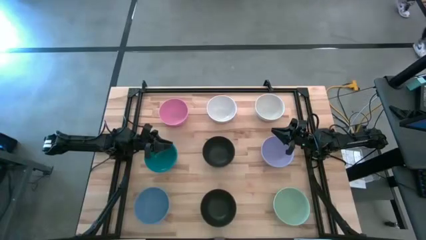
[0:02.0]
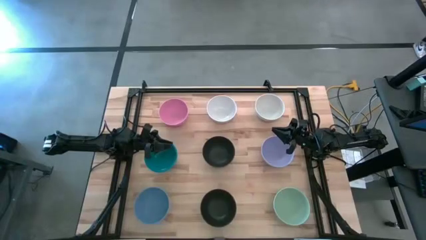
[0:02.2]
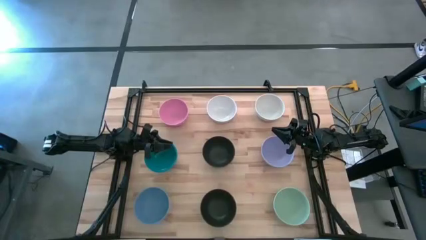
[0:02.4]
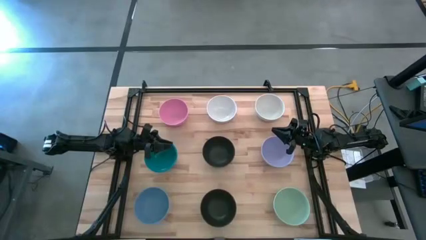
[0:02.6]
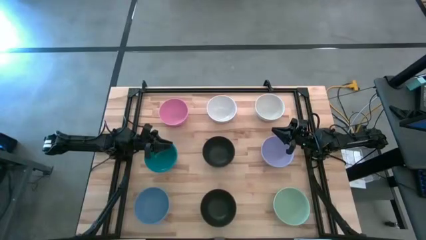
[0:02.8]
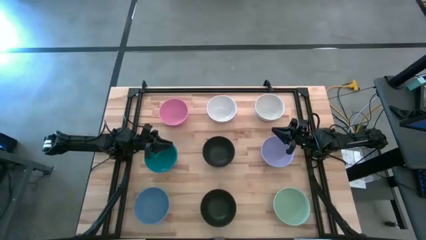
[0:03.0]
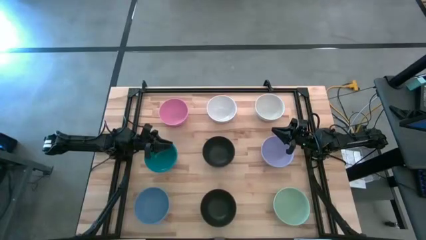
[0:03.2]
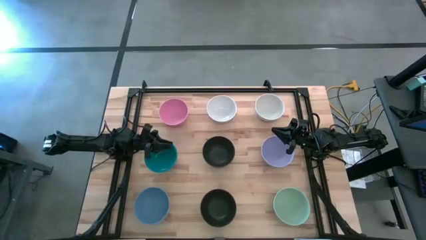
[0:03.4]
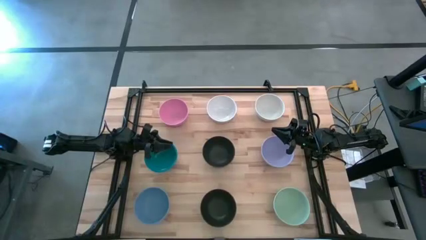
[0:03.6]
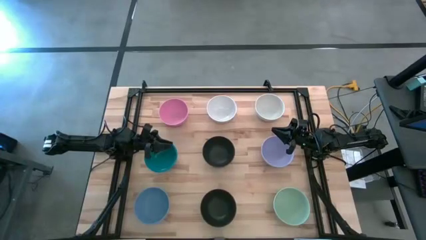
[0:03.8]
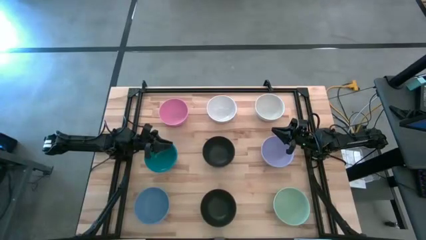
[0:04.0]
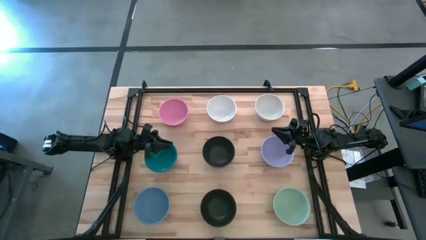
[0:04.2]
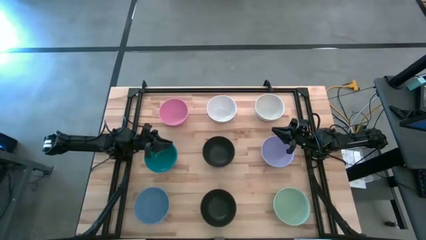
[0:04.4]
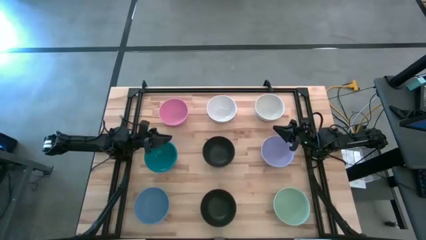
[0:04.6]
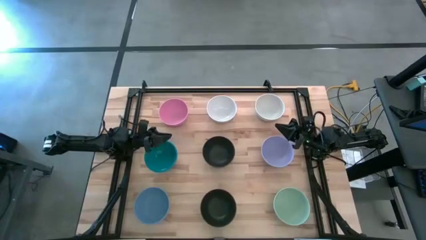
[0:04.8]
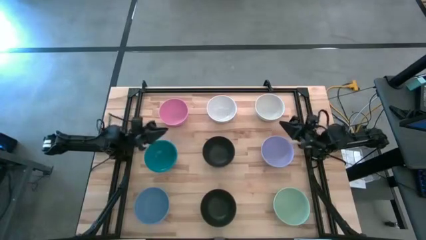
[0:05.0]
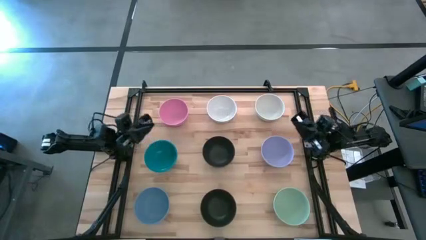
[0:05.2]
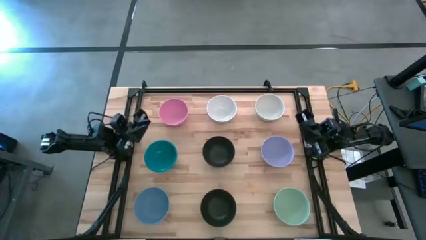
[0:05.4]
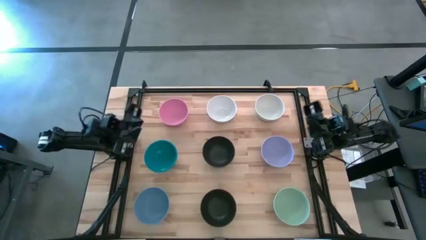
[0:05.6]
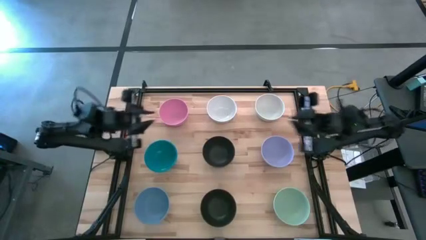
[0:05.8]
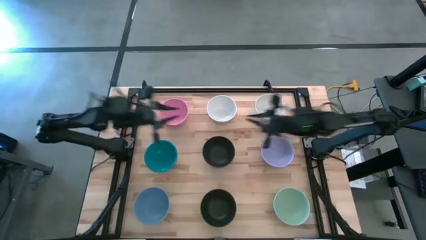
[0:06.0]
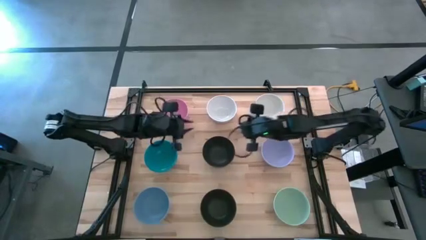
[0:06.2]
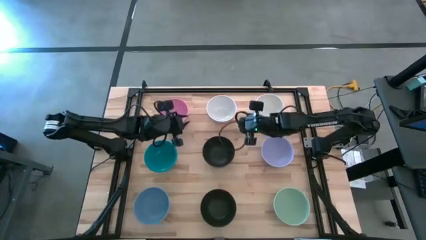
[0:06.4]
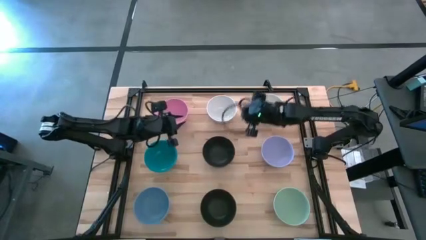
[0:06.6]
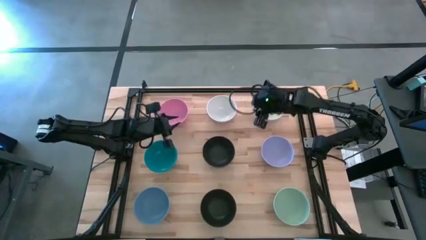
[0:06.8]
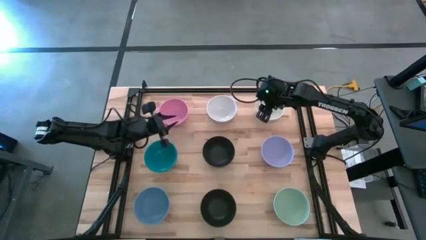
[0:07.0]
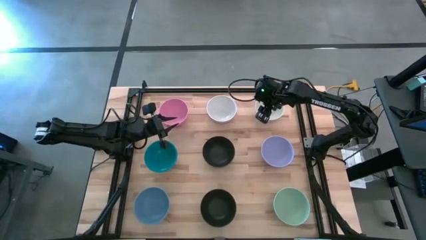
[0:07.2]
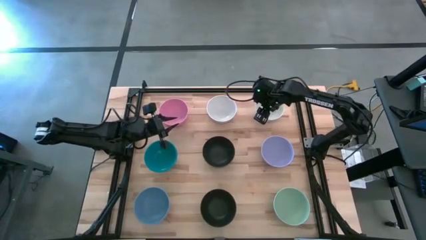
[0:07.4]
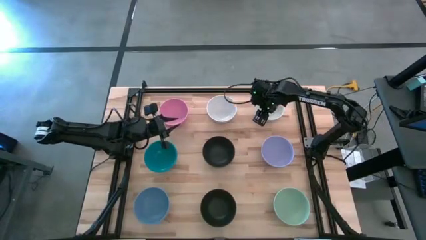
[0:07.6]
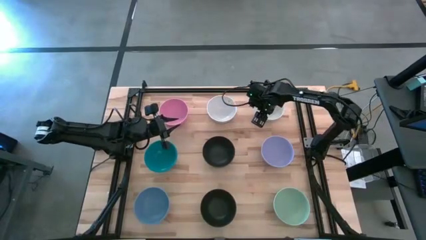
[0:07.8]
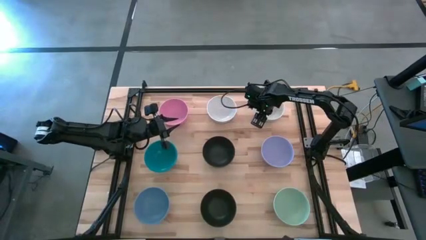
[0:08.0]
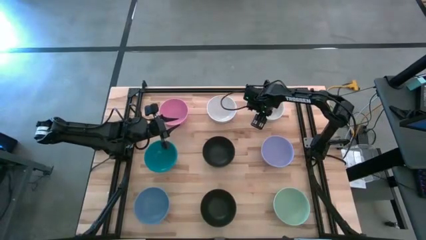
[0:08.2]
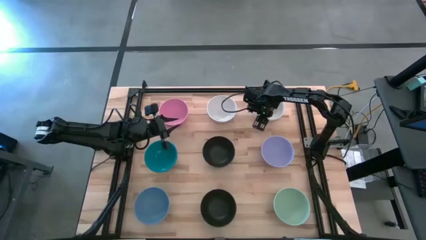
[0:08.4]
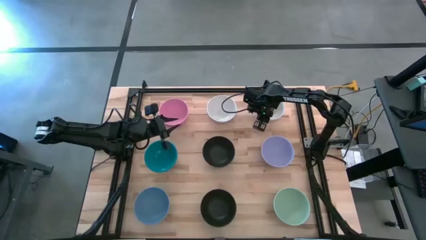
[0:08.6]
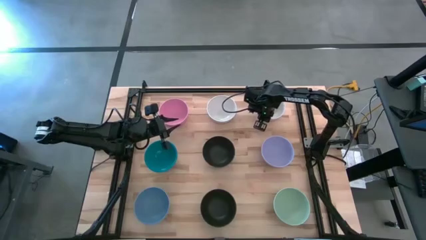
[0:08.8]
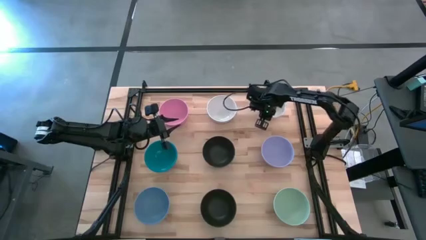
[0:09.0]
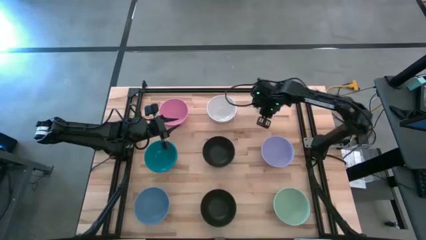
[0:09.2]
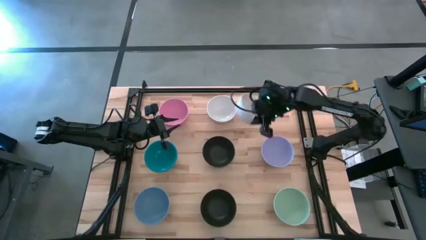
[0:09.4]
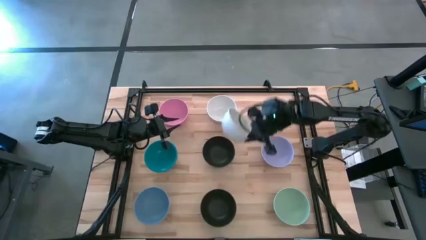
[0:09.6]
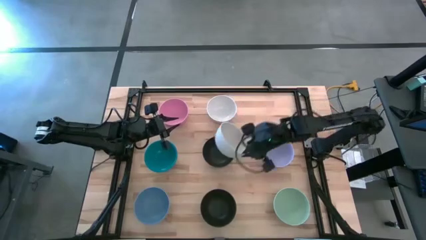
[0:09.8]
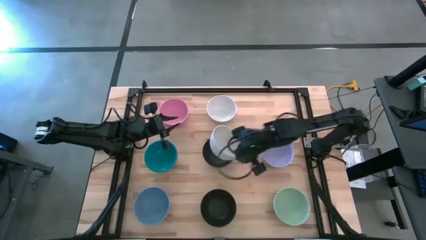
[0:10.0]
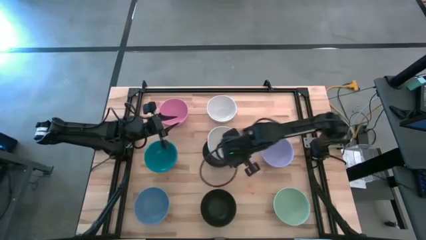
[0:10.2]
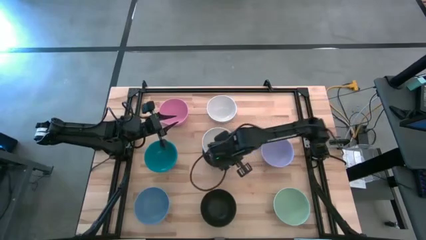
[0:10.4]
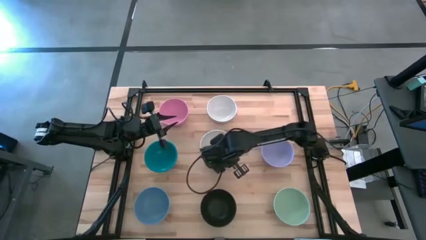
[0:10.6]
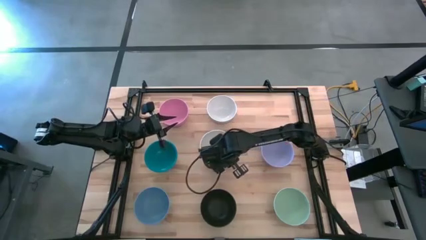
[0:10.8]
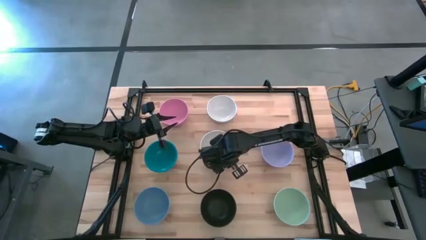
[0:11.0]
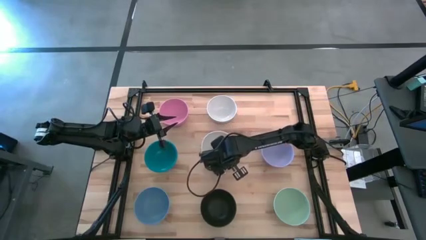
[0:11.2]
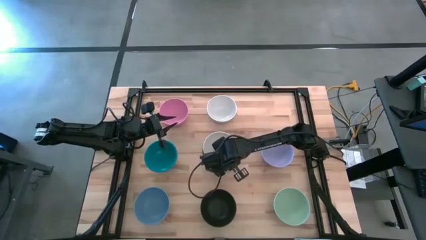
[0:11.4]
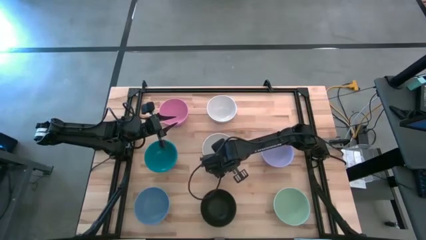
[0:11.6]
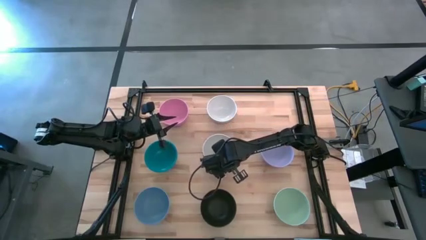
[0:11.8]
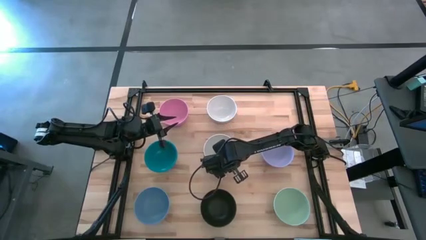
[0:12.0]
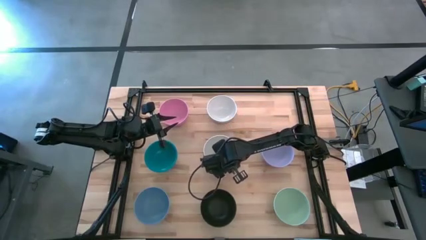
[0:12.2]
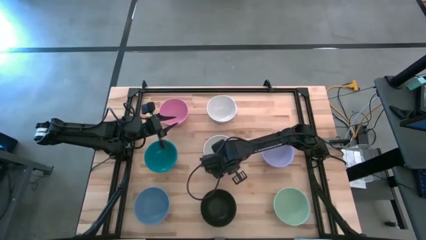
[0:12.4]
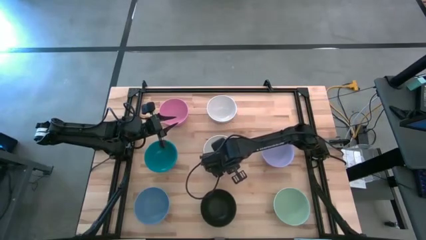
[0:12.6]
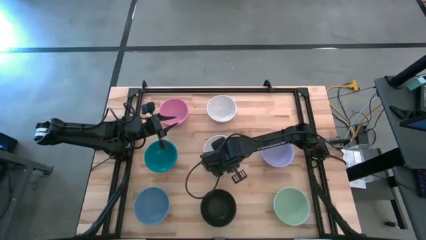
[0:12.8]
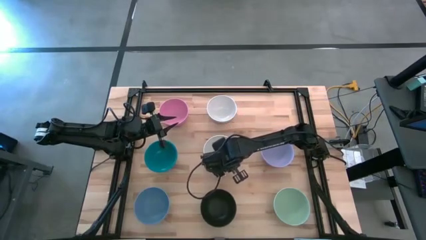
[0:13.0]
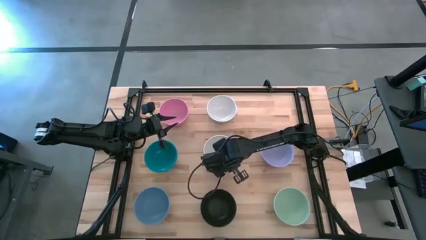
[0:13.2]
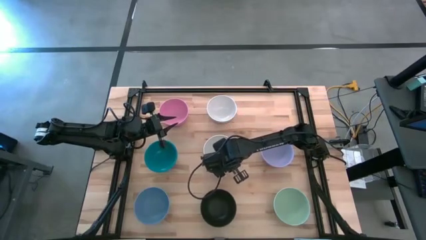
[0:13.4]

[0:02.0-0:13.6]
Task: Nest bowls inside each other
Stack the right white bowl on top of the top black bowl

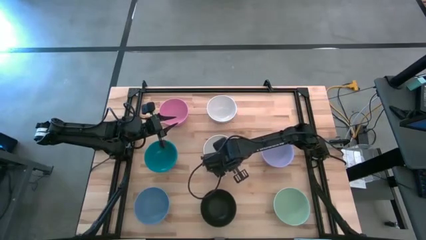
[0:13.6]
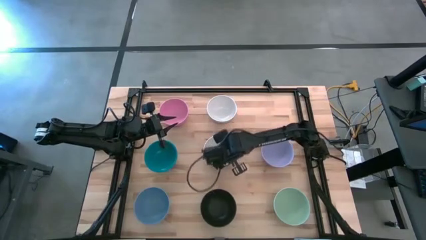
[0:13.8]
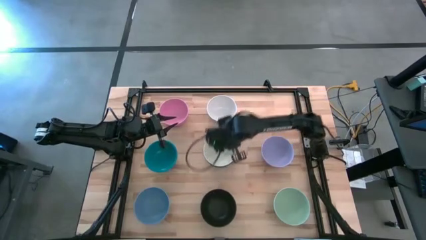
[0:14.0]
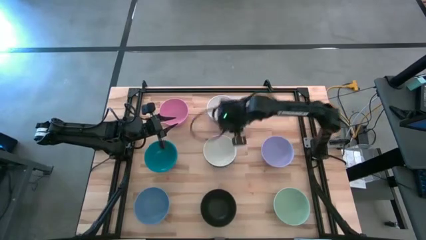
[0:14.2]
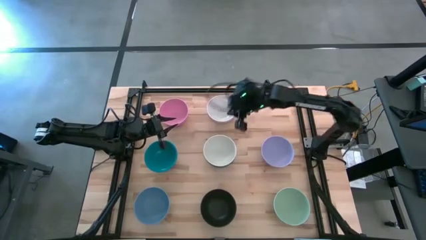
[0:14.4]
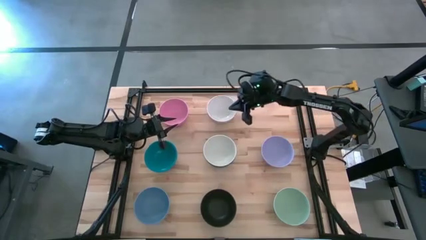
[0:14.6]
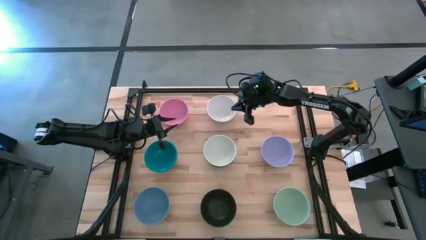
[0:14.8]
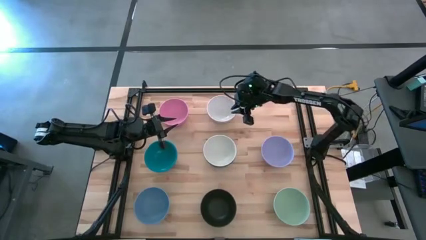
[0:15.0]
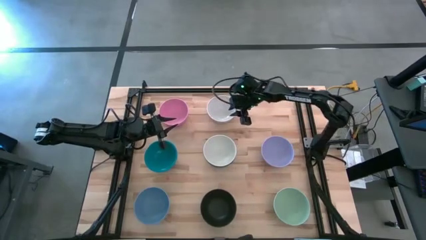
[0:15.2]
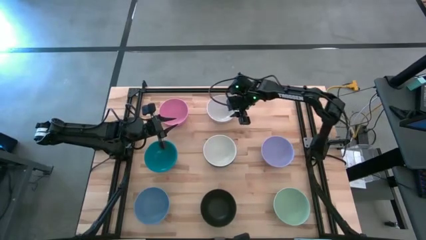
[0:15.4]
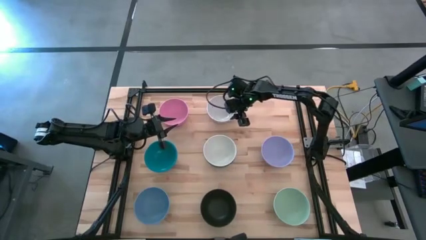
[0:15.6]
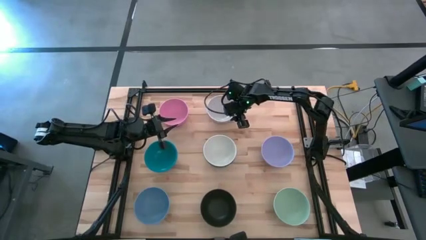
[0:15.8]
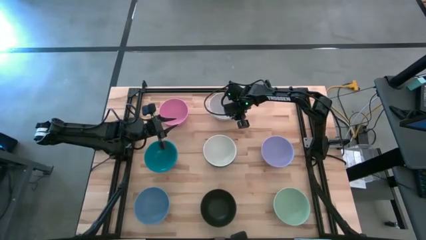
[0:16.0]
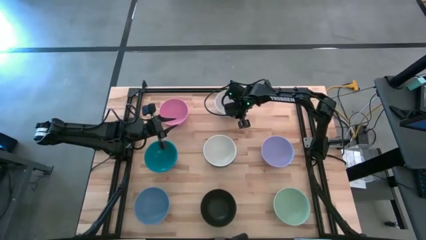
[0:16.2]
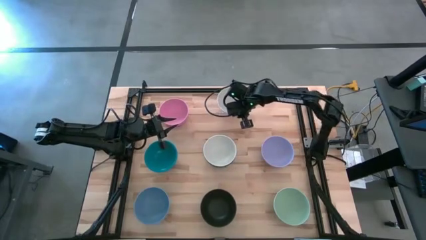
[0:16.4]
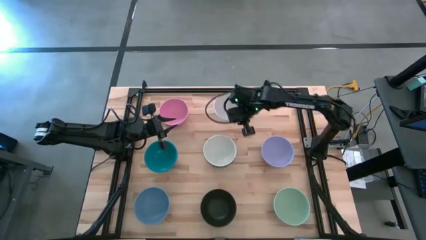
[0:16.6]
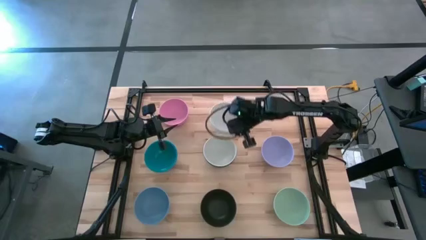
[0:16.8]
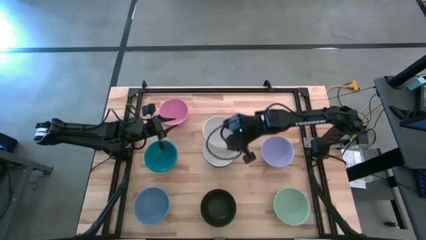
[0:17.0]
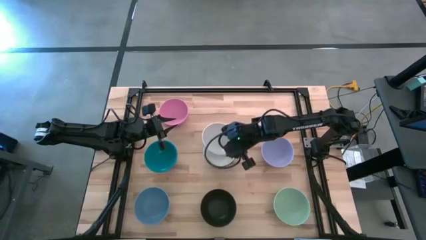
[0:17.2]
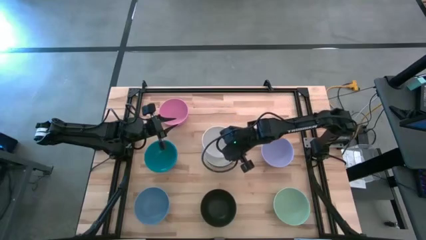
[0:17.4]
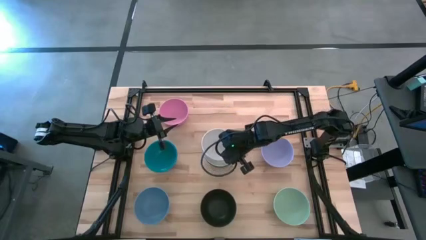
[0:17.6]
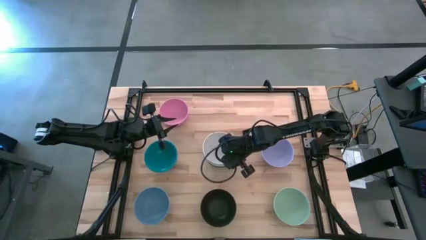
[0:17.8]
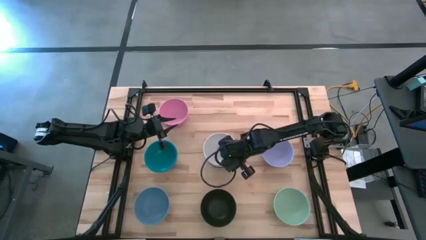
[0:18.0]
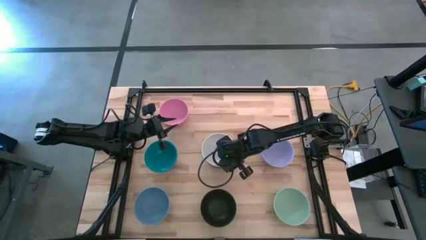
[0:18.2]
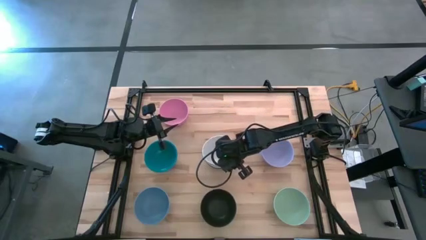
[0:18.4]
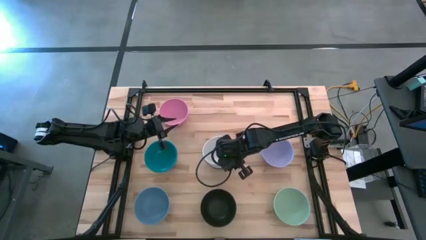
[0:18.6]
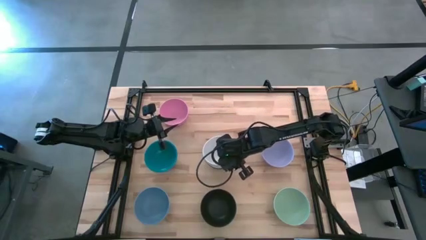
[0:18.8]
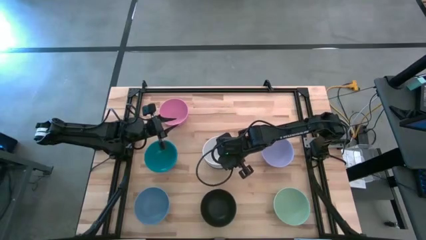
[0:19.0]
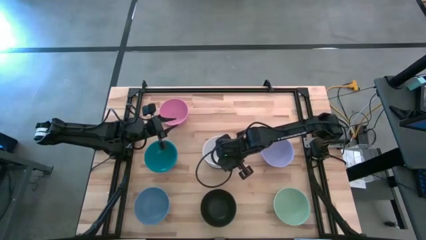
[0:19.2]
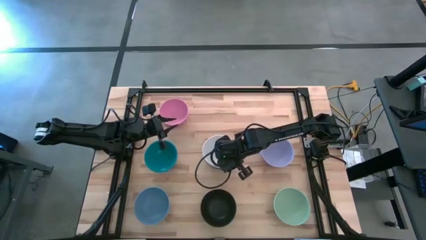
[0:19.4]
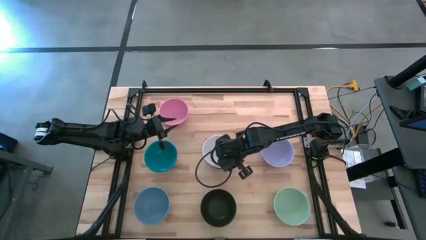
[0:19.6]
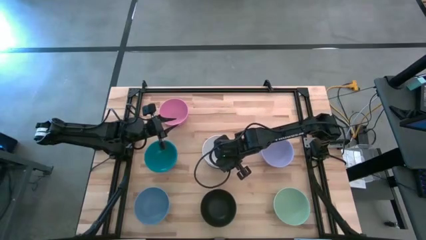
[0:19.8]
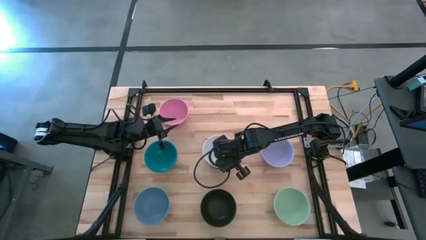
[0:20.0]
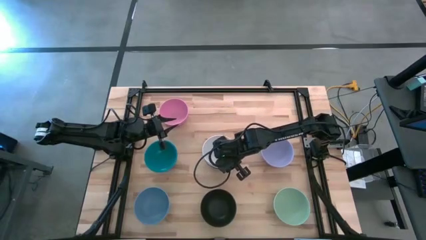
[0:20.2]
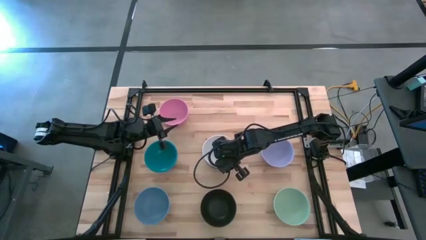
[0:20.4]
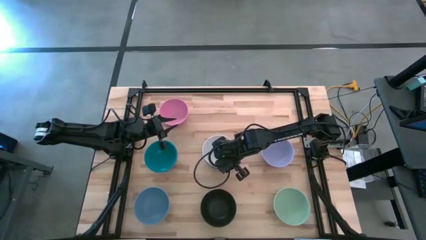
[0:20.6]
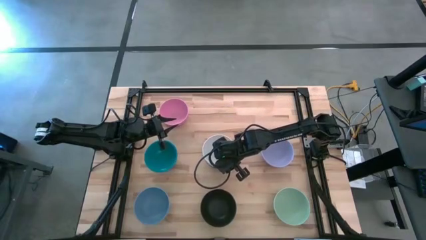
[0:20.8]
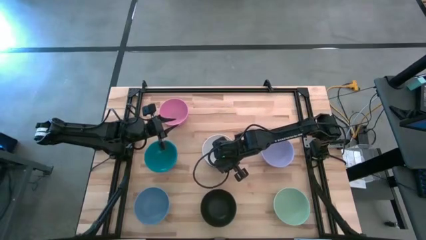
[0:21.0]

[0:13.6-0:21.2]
Stack the white bowl on top of the white bowl
